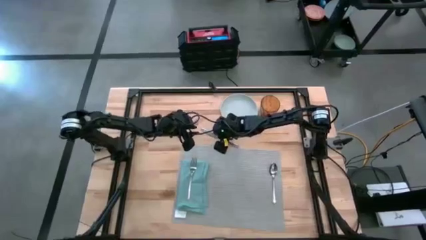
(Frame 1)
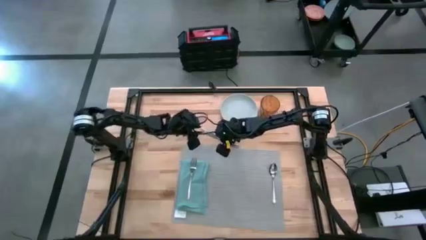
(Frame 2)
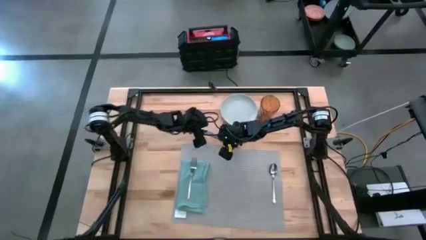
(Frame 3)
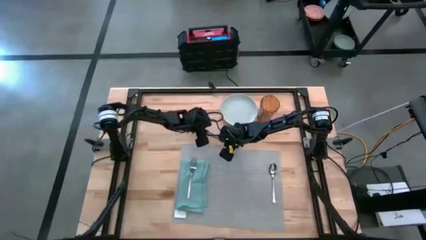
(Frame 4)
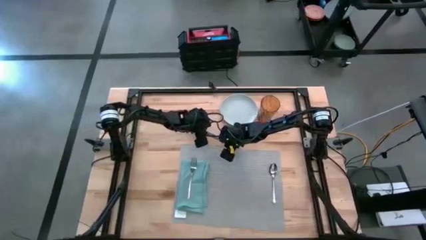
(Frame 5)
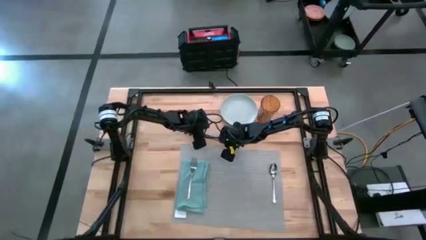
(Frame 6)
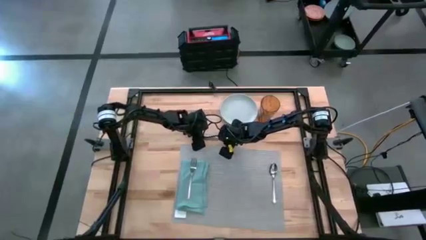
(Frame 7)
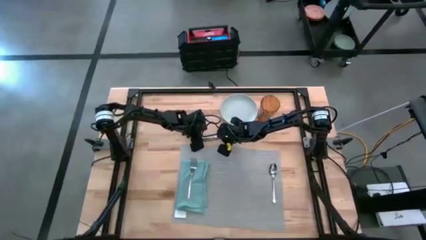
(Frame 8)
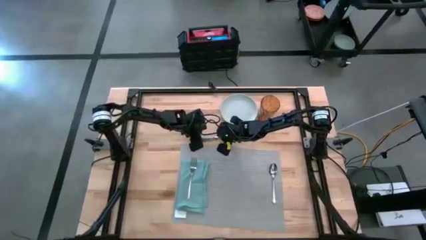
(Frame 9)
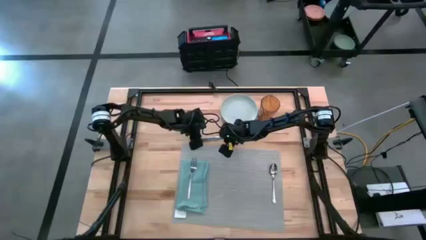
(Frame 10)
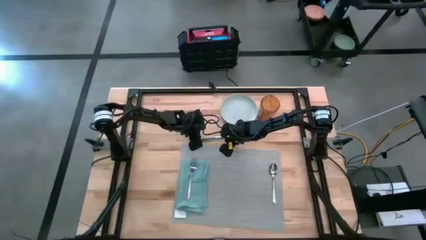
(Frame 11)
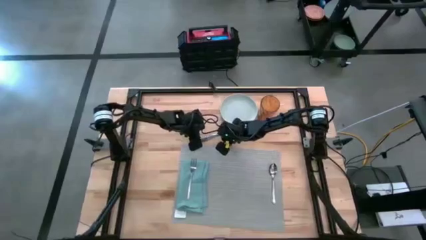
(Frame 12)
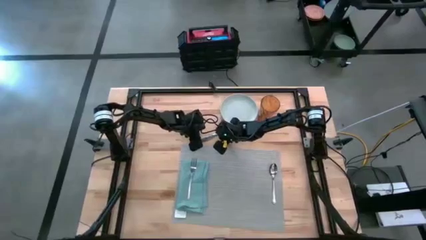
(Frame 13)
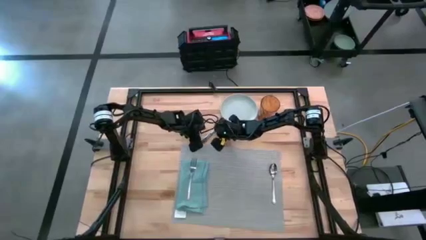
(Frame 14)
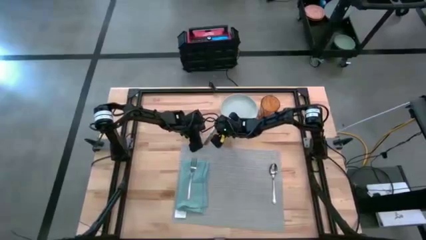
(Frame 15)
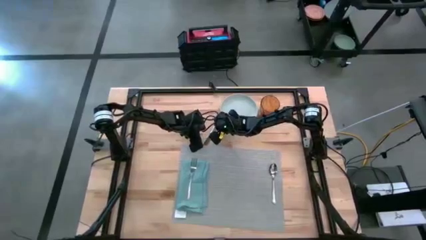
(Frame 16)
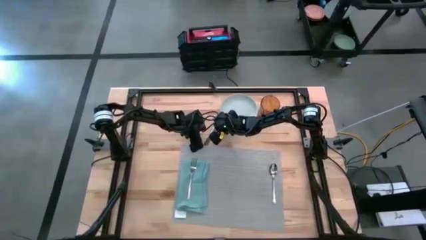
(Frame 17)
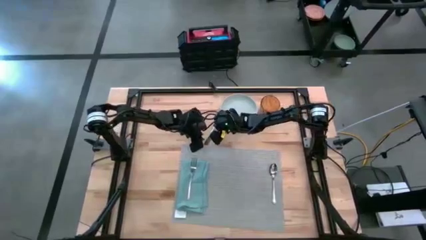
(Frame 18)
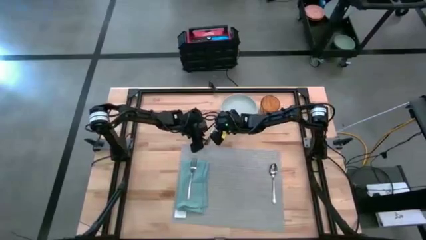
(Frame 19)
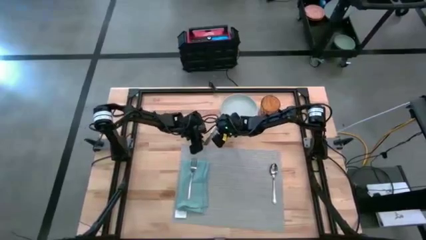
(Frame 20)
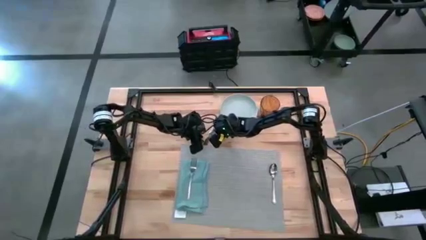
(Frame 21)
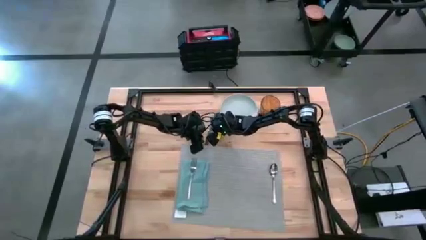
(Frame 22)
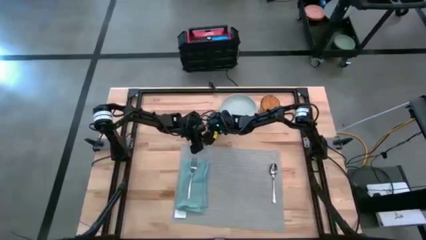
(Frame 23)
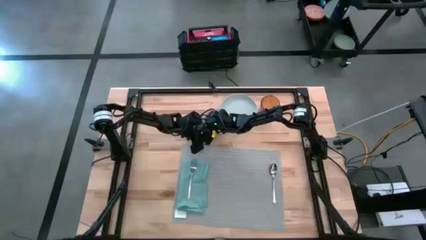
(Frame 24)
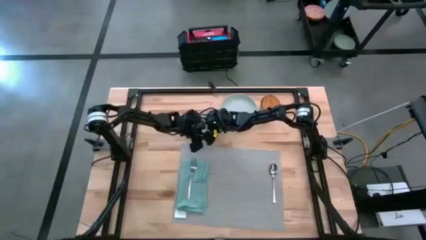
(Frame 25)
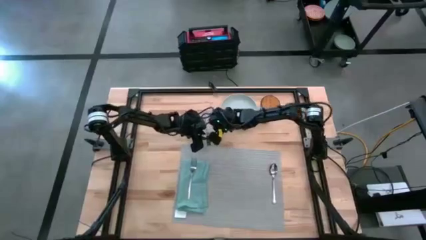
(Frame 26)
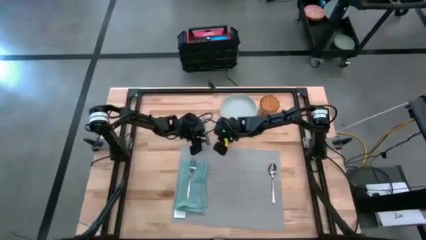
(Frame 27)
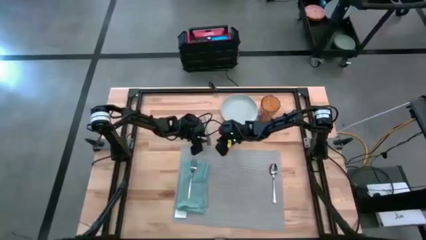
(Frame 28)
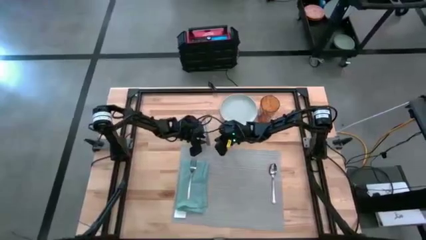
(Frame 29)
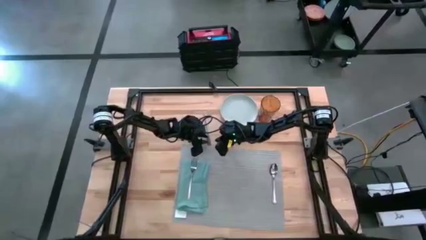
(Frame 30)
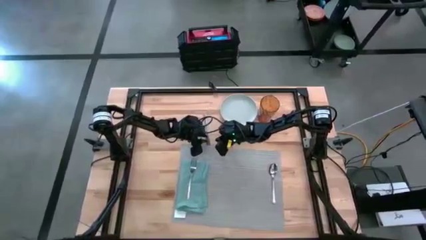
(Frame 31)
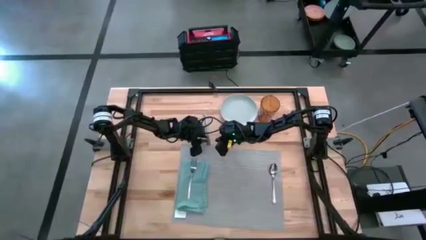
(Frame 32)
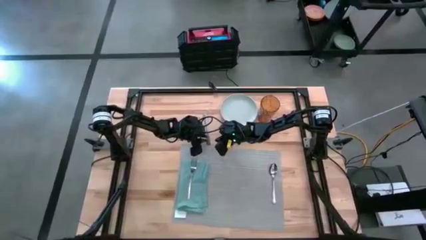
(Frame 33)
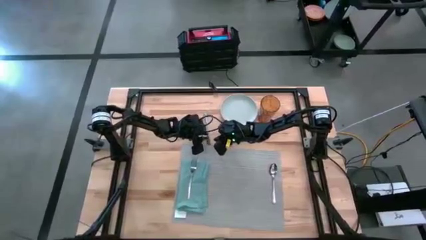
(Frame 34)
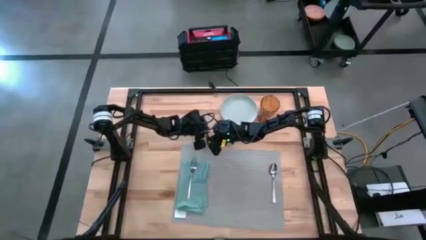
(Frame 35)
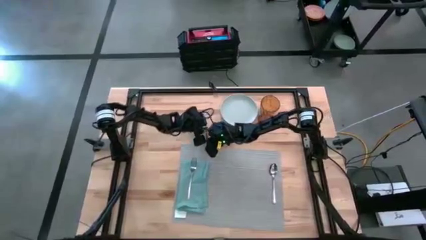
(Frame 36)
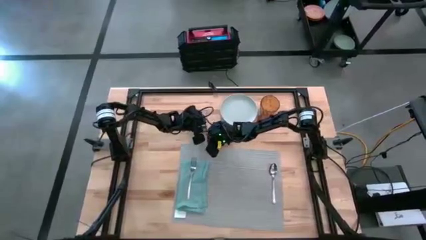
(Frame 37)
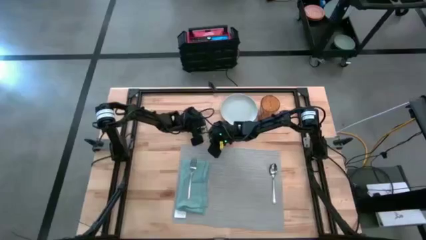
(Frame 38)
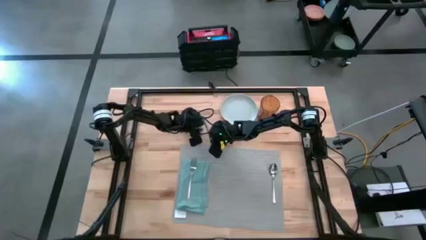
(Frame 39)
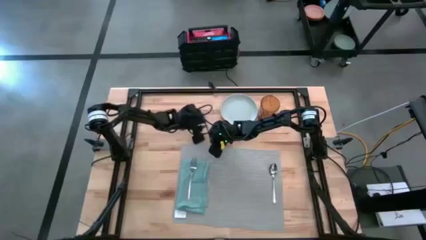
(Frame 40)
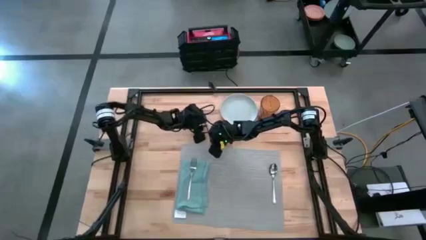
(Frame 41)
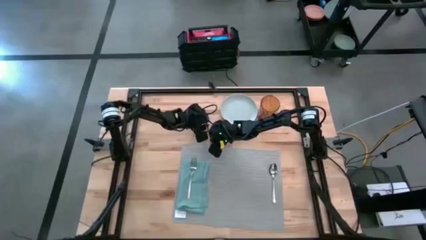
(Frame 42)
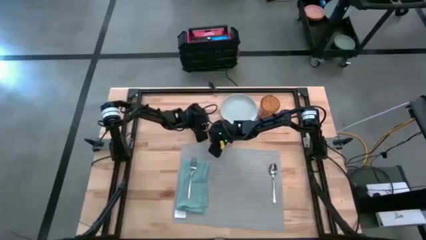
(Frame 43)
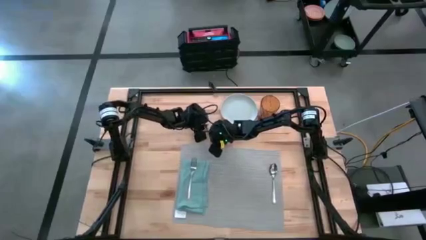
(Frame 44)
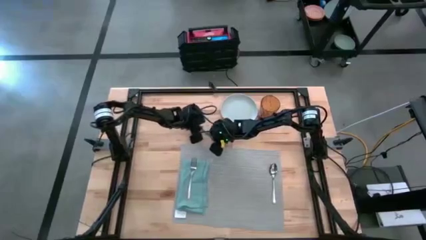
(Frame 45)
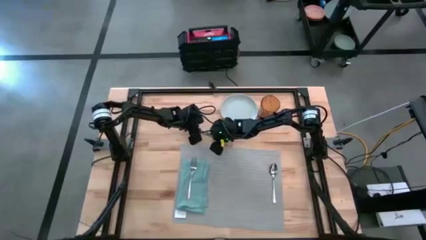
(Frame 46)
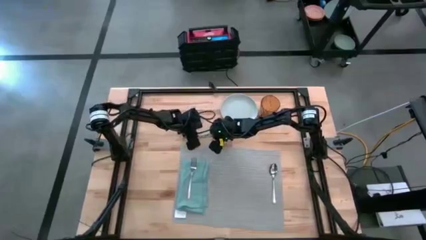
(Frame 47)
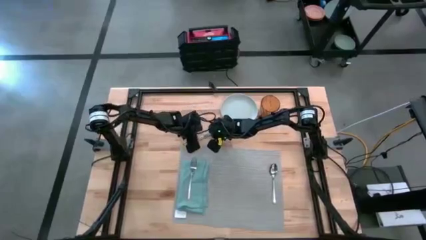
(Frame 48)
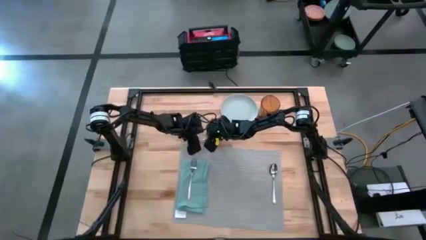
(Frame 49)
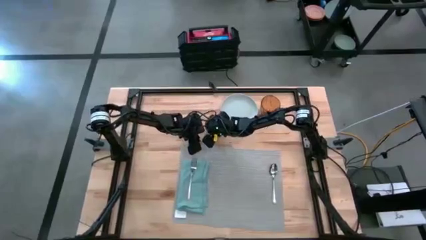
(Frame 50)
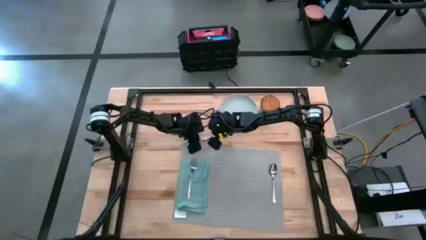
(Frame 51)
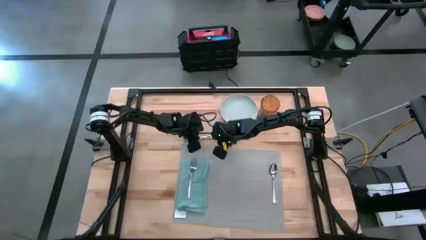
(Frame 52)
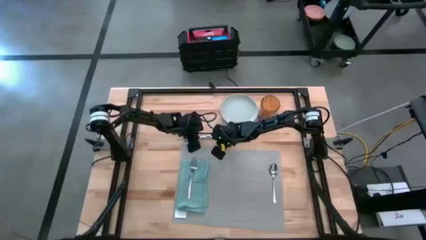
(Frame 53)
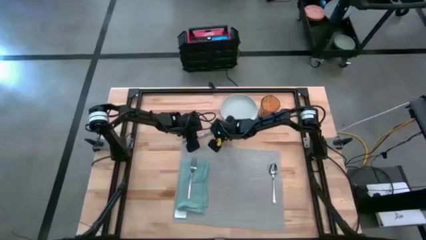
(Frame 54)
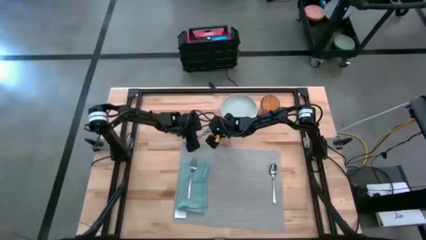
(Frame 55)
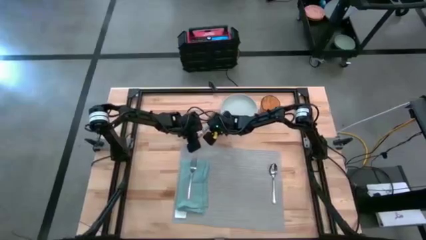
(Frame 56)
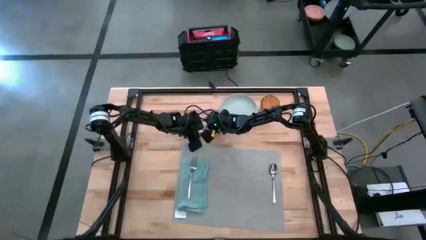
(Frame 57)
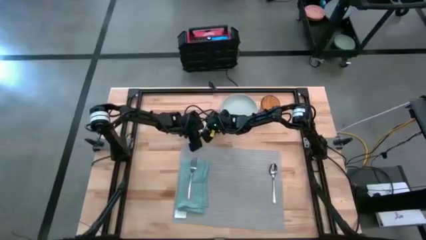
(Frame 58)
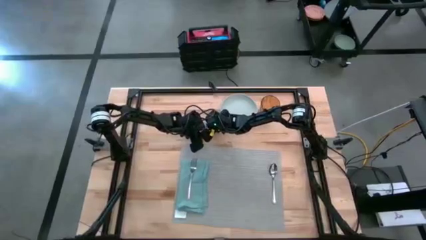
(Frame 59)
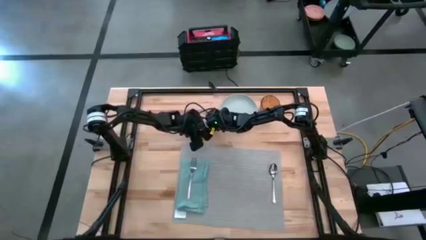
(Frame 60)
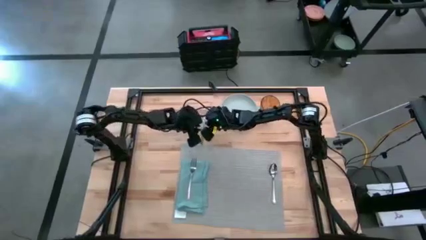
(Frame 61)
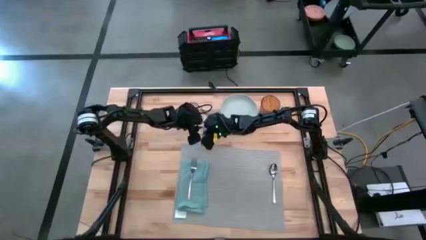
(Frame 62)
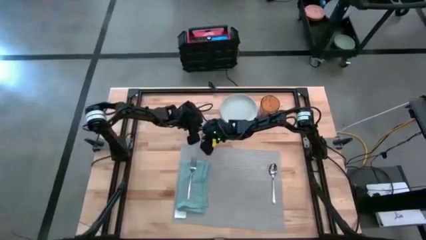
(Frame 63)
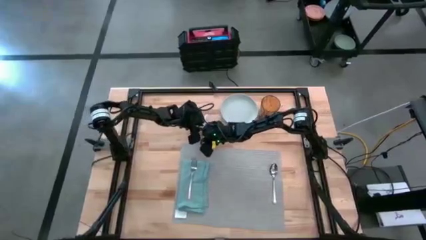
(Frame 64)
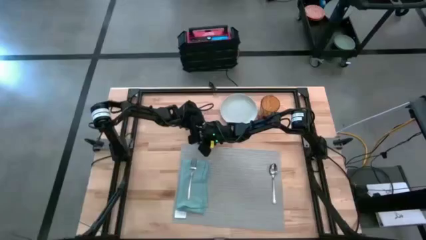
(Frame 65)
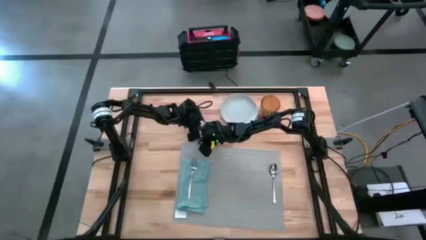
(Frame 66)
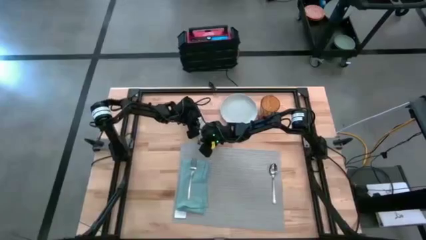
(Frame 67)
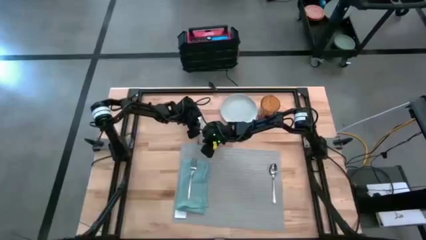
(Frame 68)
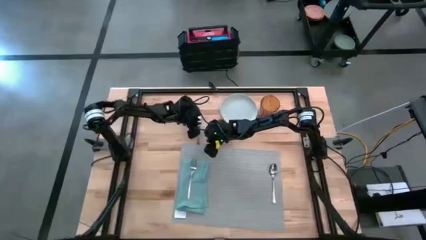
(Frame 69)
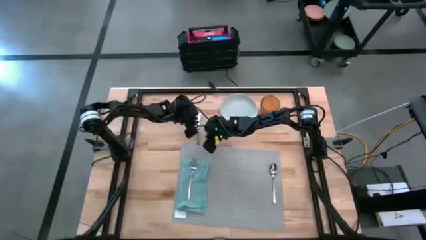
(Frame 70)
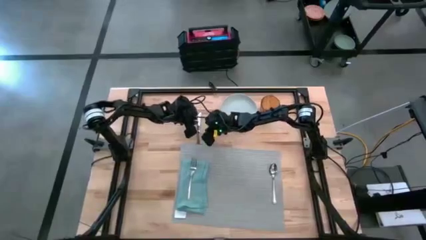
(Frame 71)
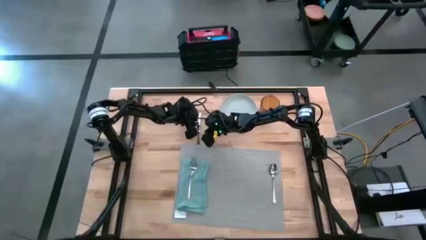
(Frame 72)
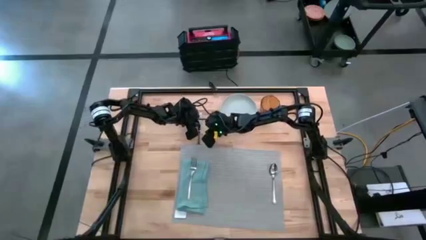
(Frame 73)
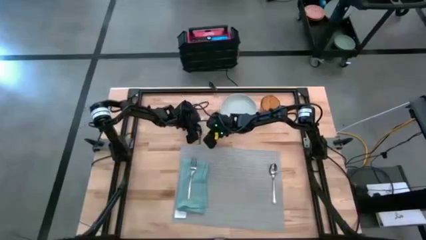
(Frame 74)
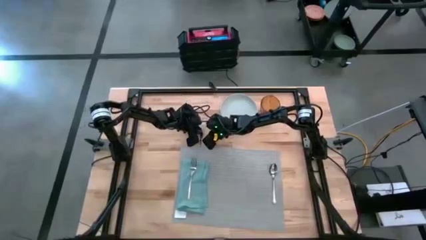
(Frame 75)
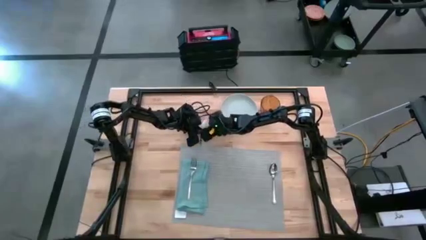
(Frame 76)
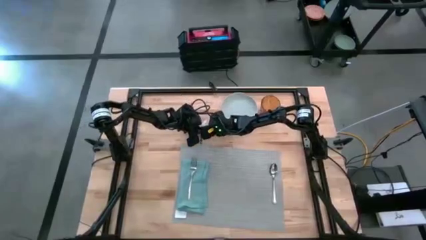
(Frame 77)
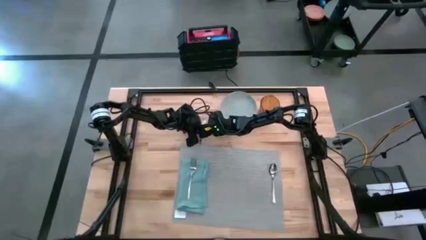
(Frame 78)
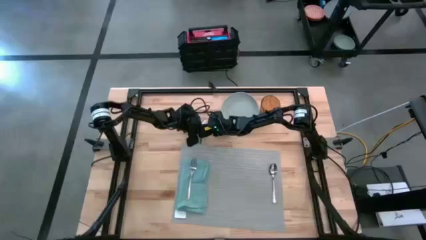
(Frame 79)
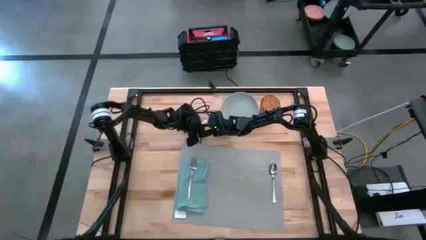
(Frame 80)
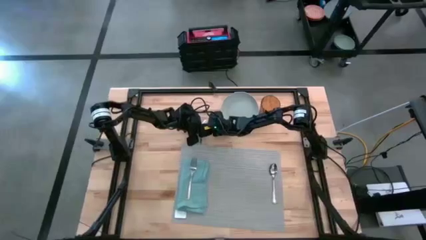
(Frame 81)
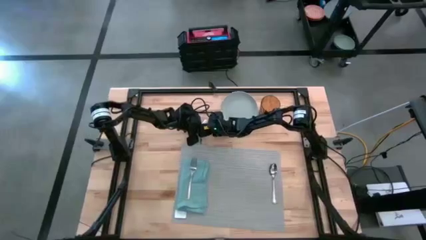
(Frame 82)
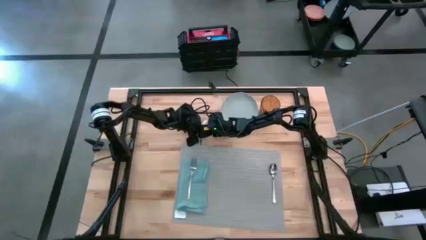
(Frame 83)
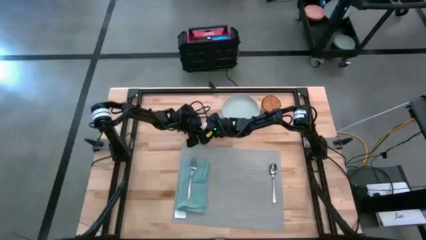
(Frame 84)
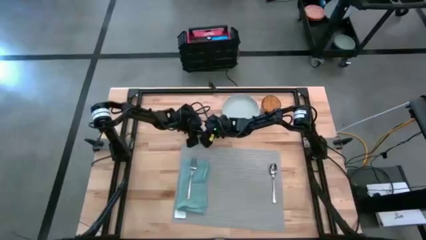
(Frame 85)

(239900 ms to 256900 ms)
Task: Set table place
Put the silver knife on the gray placemat, to the left of the silver spoon
